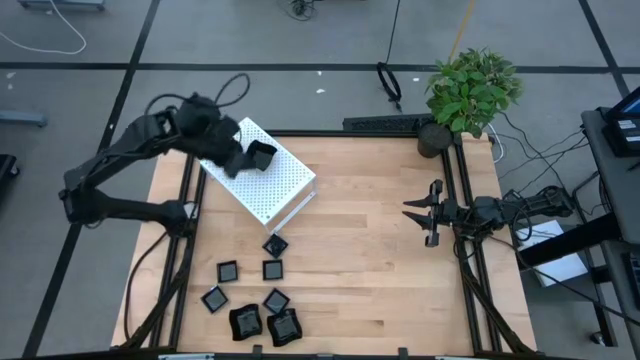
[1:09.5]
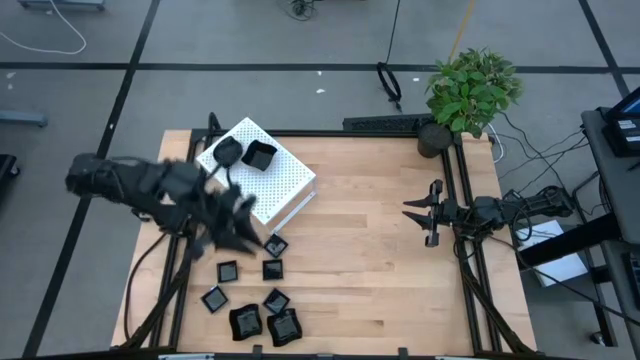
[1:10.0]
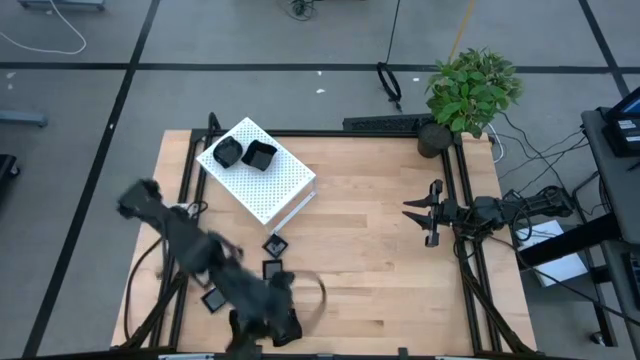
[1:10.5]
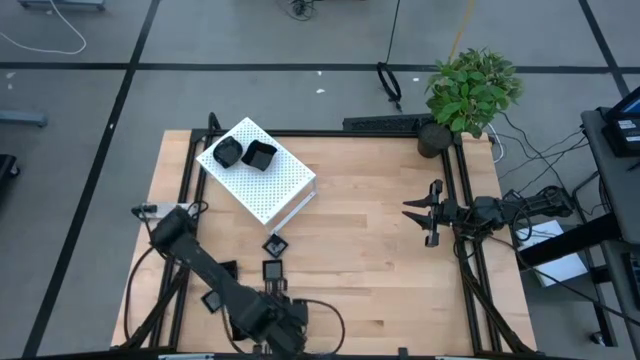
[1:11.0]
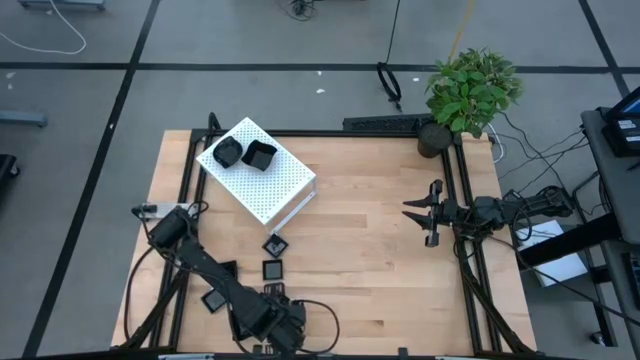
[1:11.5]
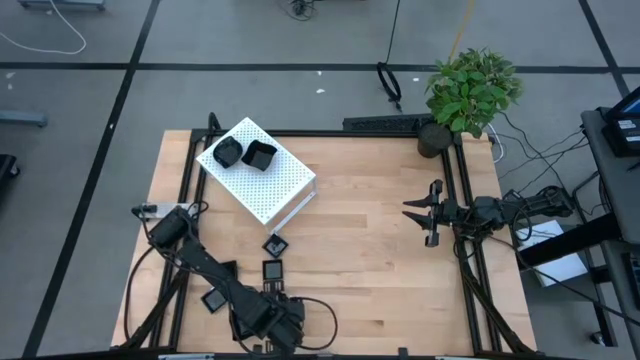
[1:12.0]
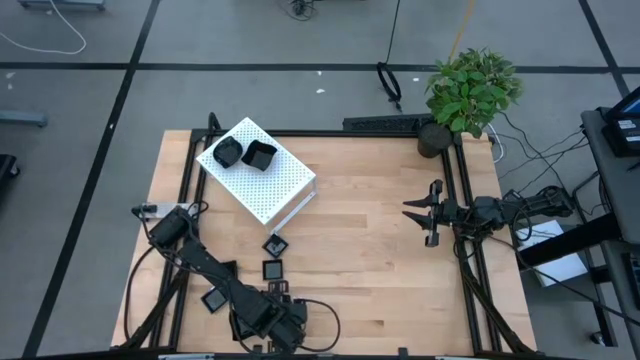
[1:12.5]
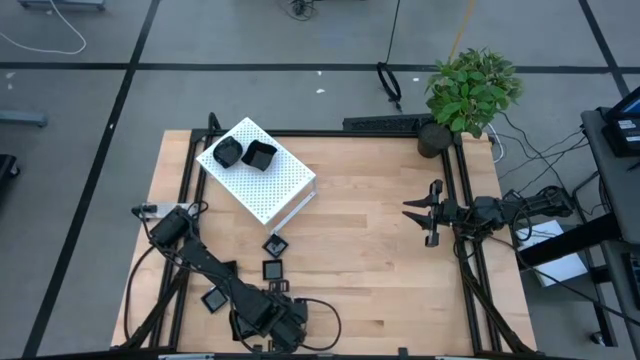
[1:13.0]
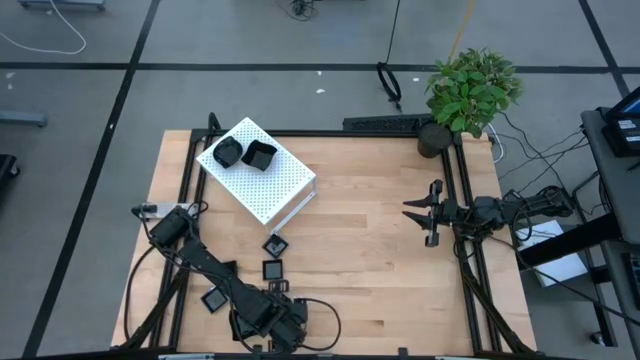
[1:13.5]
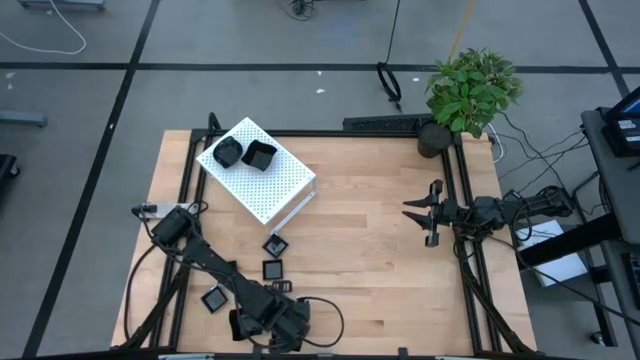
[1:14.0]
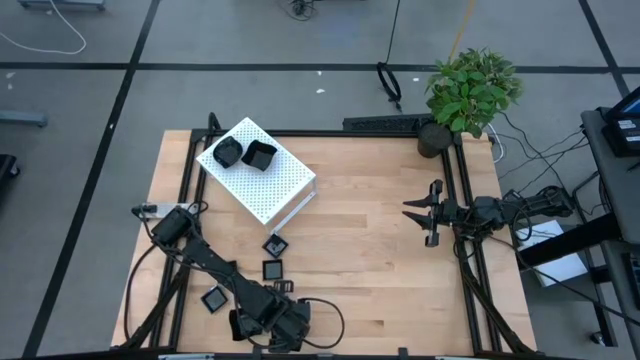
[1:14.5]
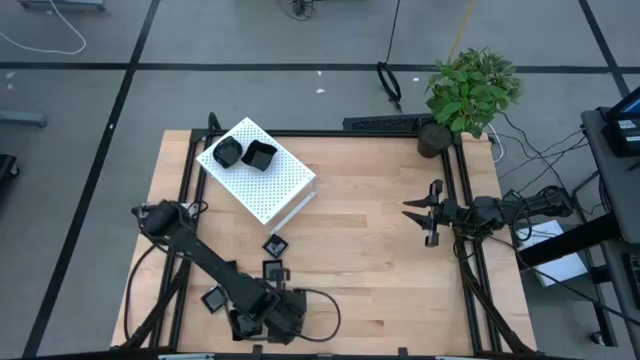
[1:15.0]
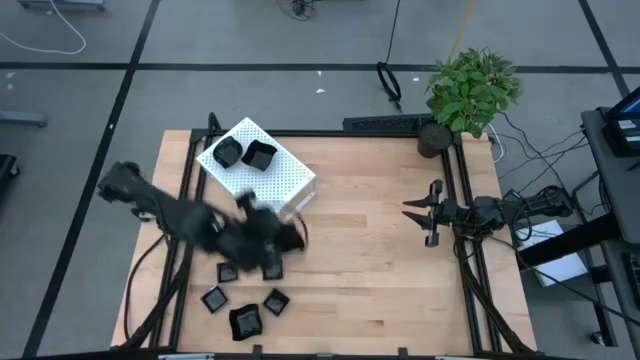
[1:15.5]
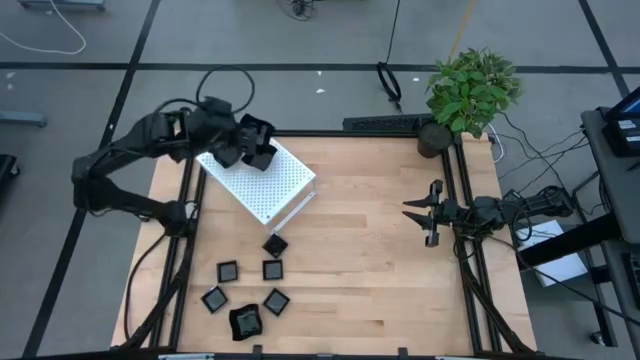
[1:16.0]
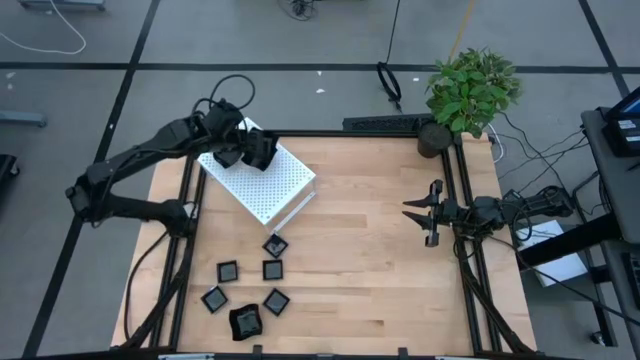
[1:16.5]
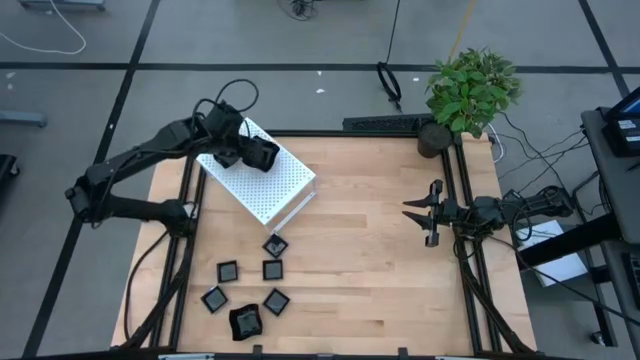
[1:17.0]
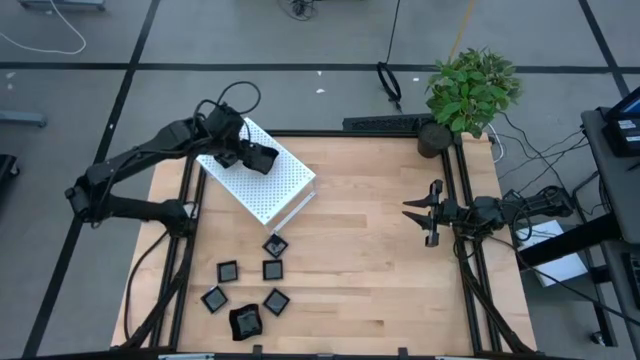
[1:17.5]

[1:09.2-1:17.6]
Task: Pick & Place Mini shaped plates
Stack the black distorted square plate on top of the black distorted square plate on the shelf

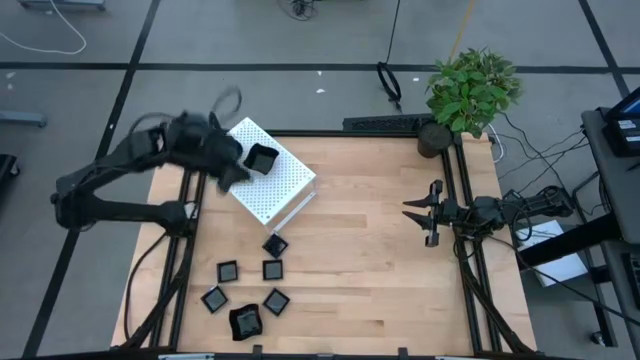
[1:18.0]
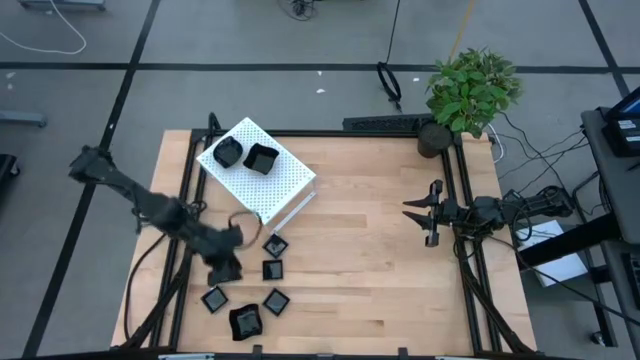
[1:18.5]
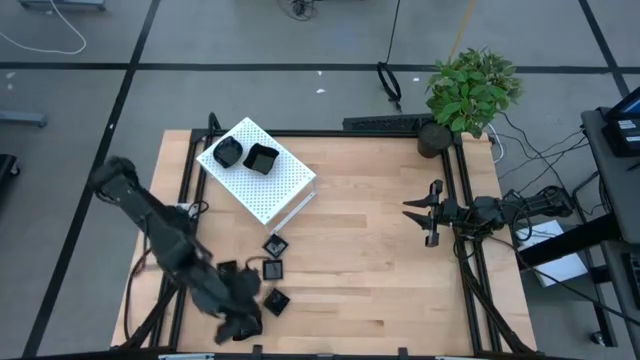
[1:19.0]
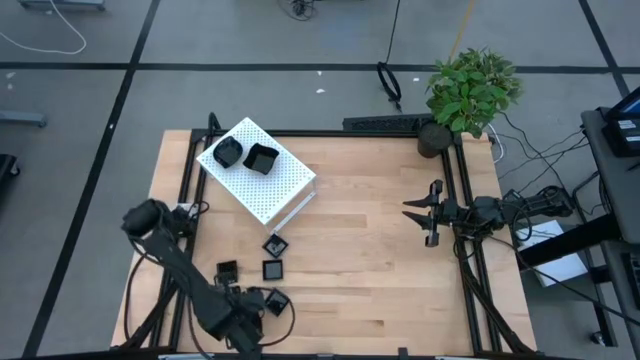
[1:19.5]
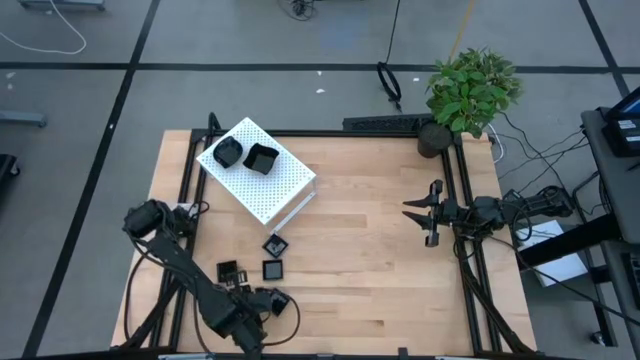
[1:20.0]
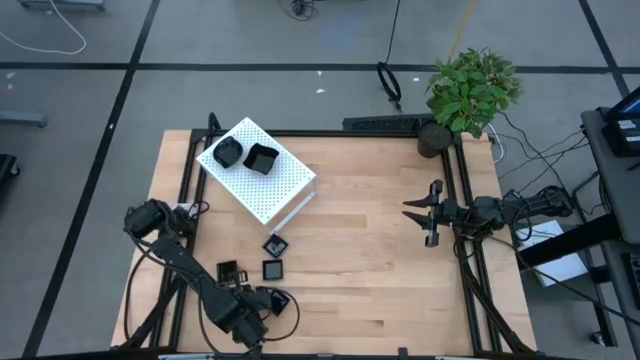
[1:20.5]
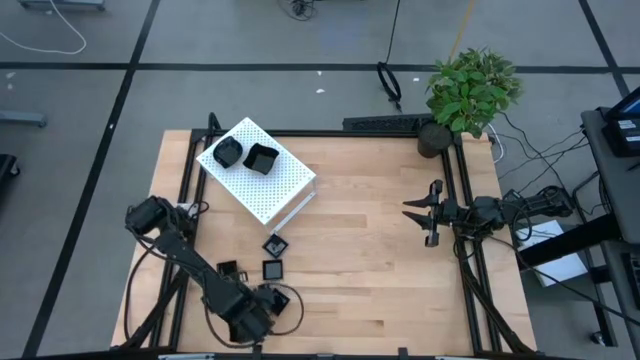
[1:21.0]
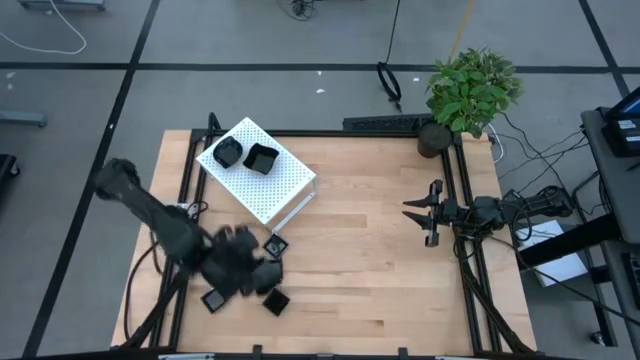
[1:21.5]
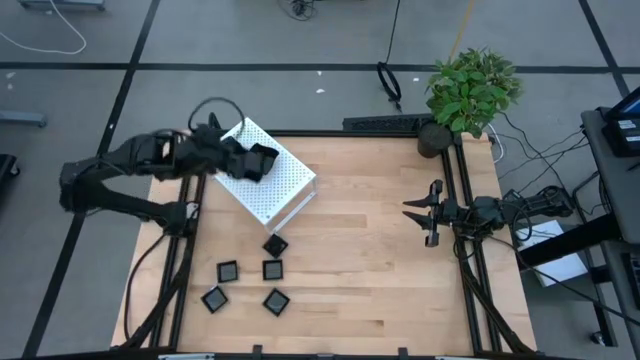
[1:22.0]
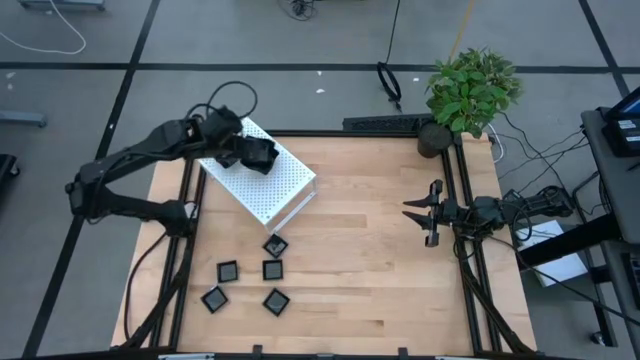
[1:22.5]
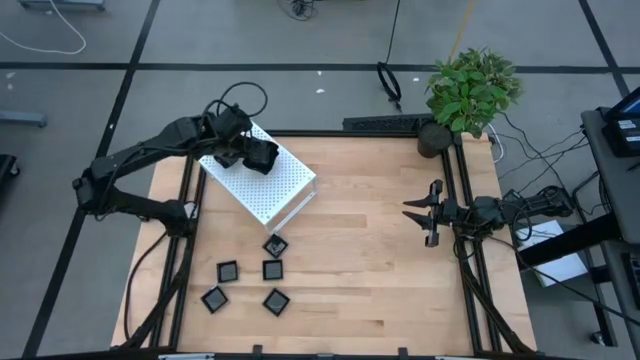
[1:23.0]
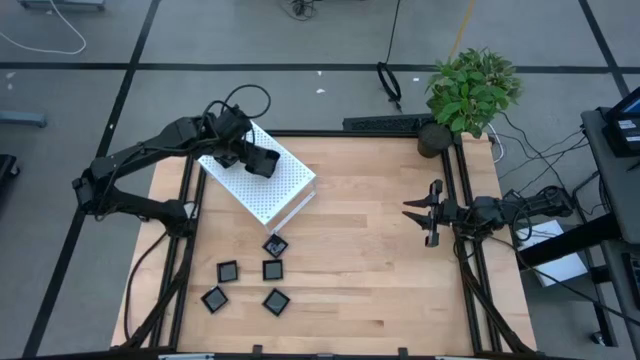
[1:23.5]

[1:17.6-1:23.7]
Stack the black distorted square plate on top of the black distorted square plate on the shelf

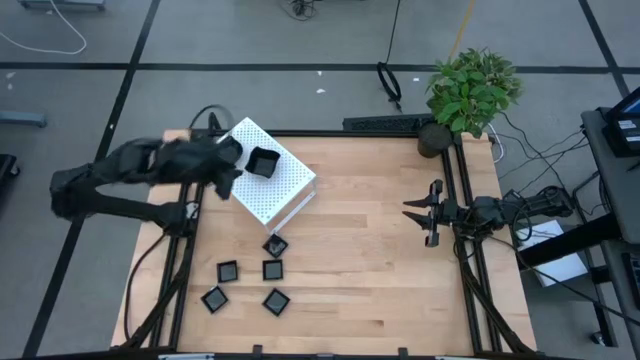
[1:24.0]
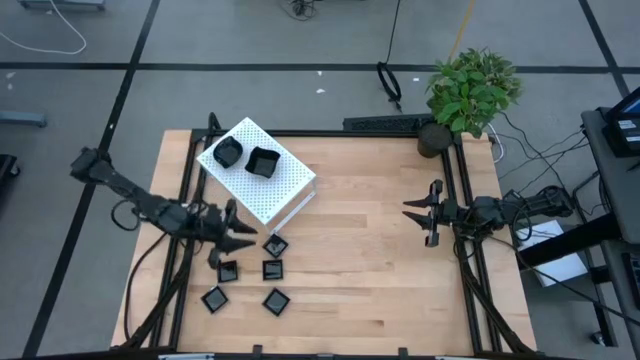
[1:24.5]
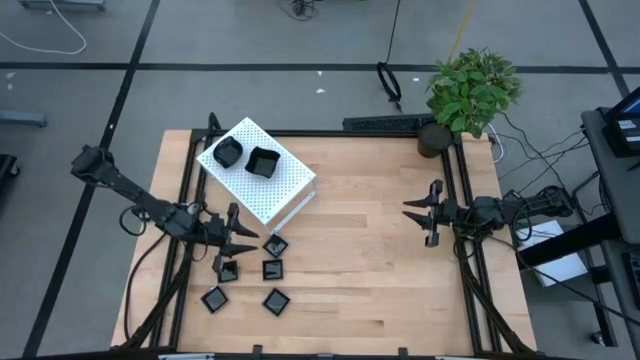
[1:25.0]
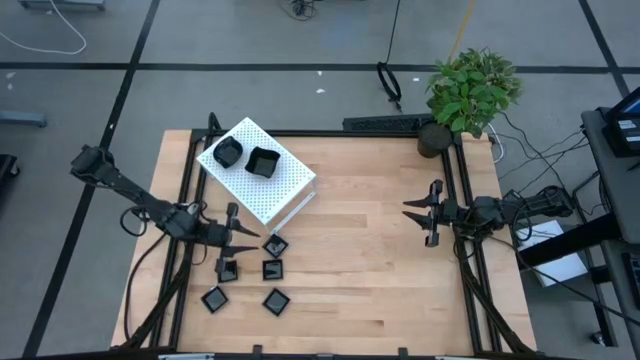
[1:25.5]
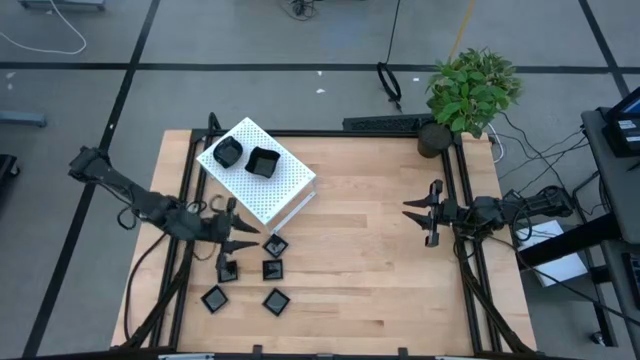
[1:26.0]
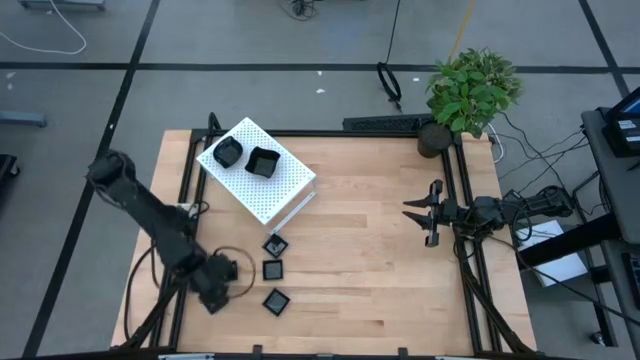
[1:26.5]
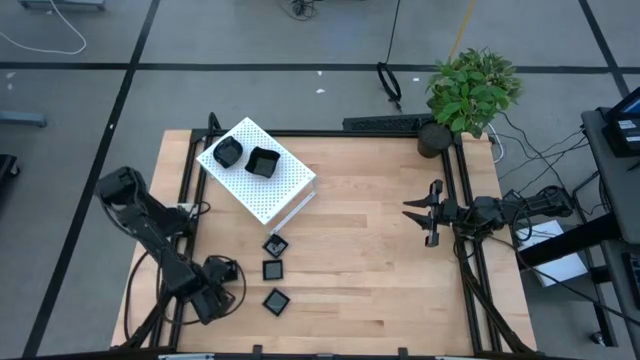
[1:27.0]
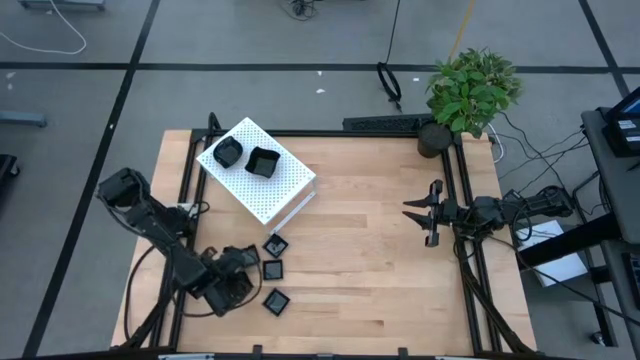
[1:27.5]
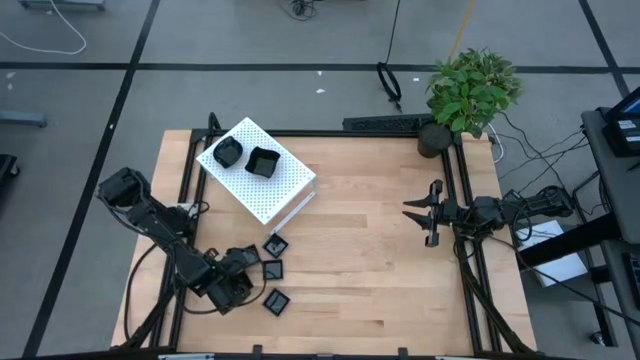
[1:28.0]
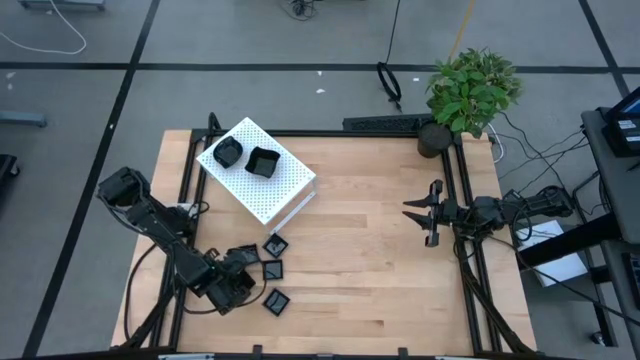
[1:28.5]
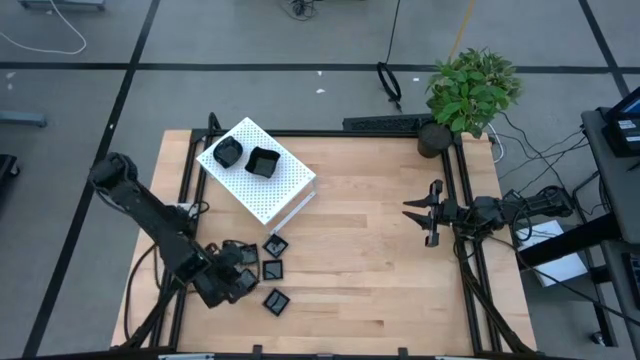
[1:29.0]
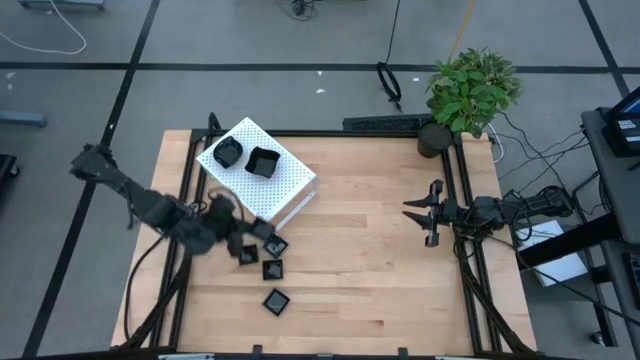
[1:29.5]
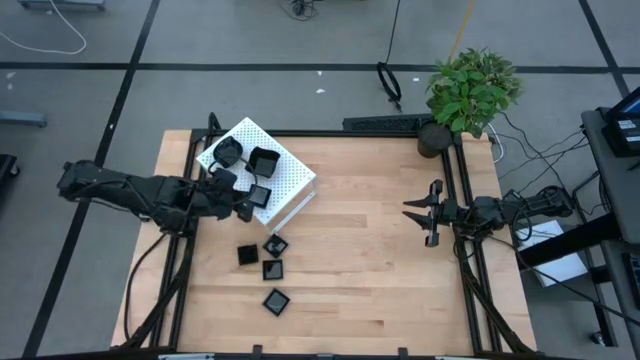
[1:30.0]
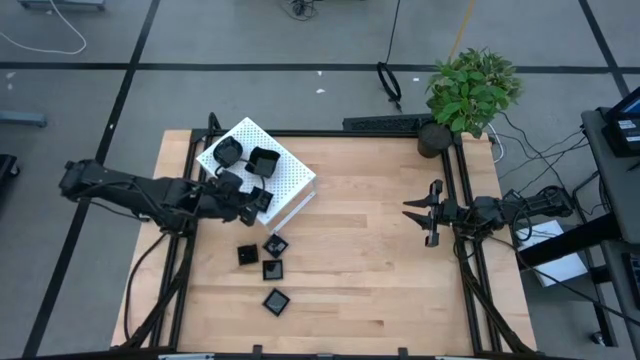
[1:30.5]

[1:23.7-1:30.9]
Put the black square plate on the shelf
